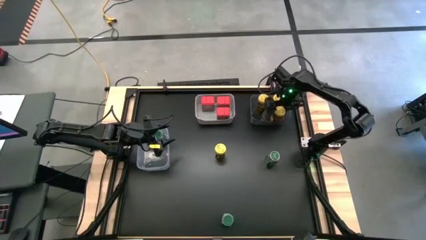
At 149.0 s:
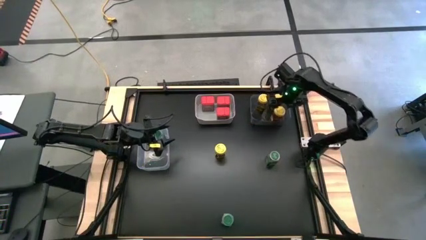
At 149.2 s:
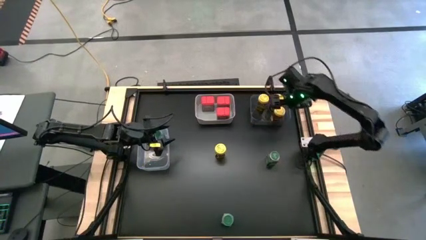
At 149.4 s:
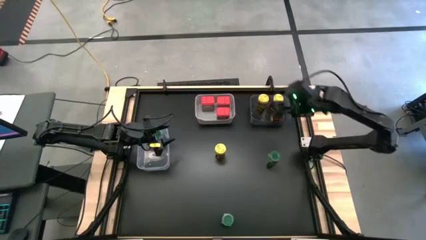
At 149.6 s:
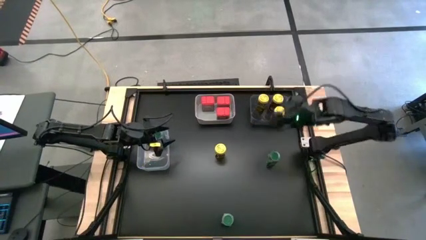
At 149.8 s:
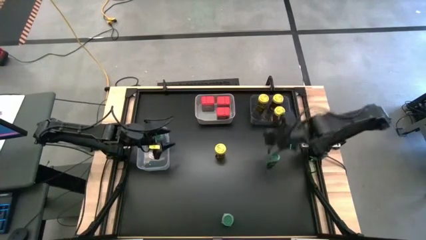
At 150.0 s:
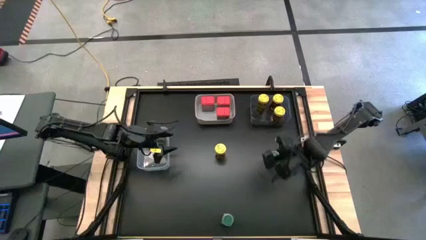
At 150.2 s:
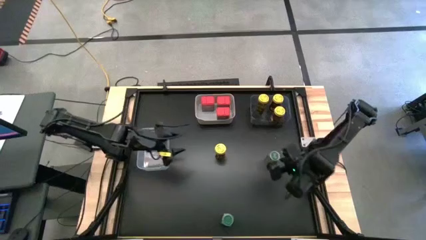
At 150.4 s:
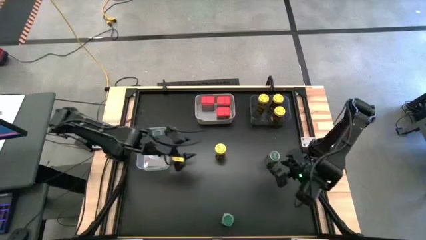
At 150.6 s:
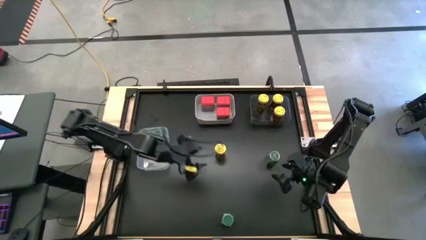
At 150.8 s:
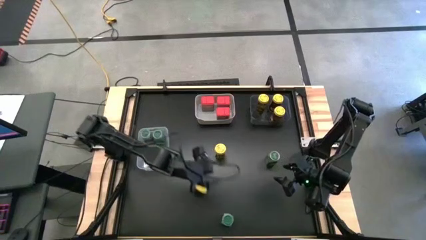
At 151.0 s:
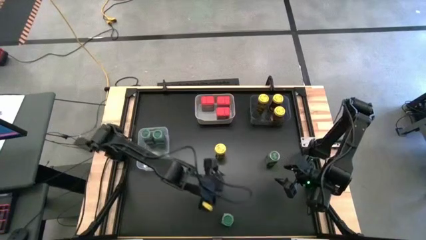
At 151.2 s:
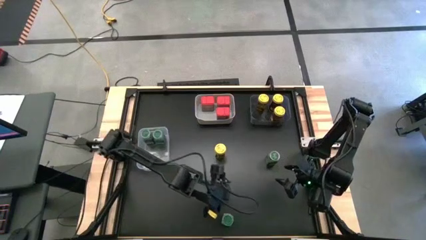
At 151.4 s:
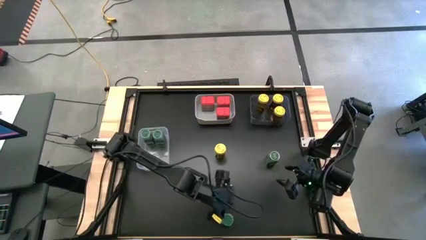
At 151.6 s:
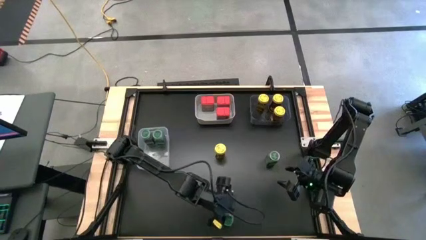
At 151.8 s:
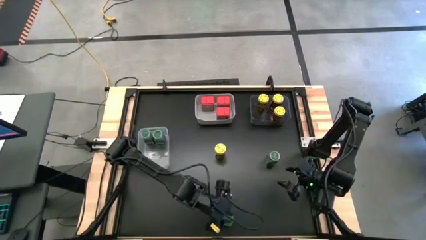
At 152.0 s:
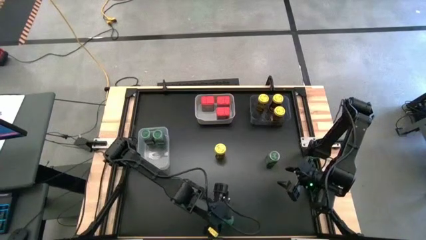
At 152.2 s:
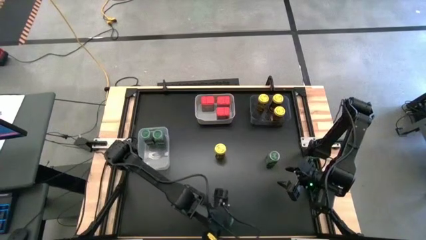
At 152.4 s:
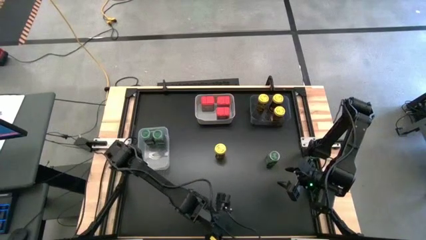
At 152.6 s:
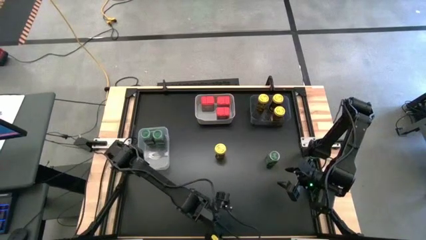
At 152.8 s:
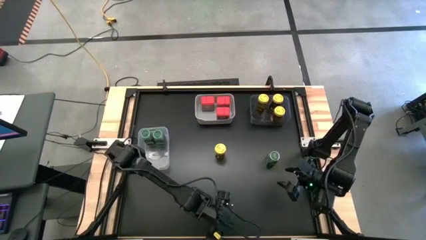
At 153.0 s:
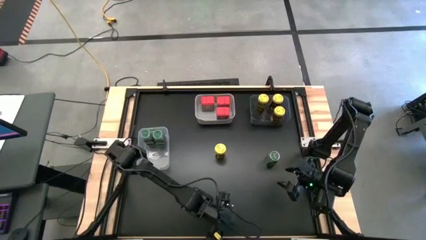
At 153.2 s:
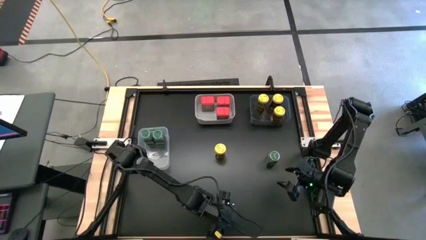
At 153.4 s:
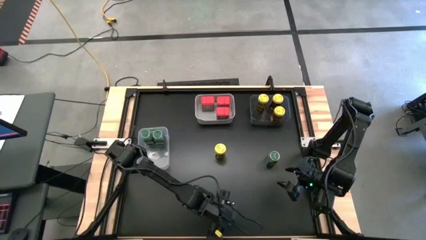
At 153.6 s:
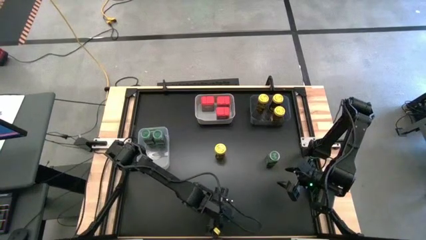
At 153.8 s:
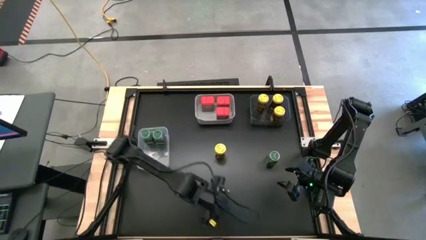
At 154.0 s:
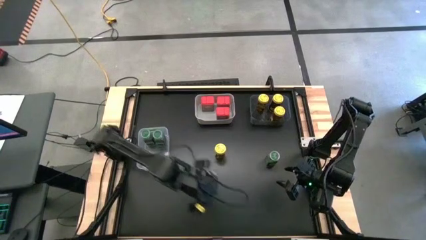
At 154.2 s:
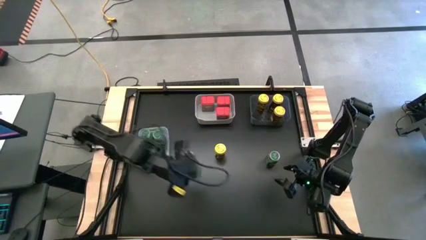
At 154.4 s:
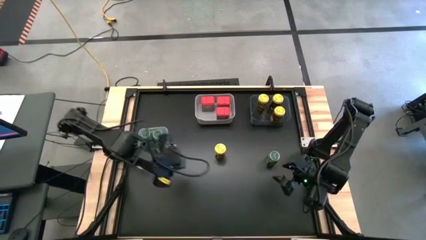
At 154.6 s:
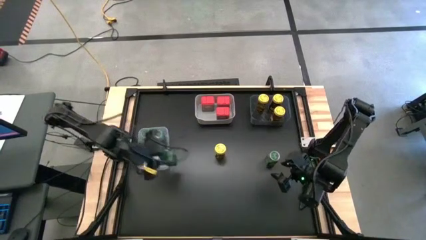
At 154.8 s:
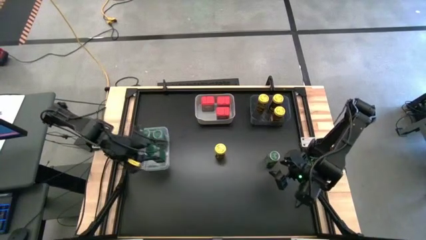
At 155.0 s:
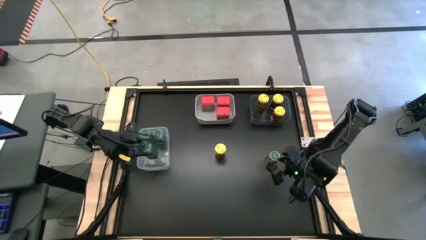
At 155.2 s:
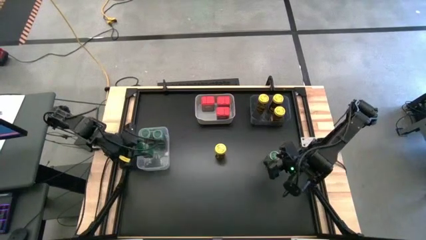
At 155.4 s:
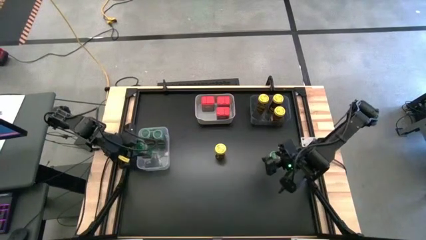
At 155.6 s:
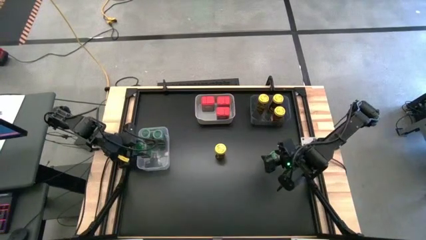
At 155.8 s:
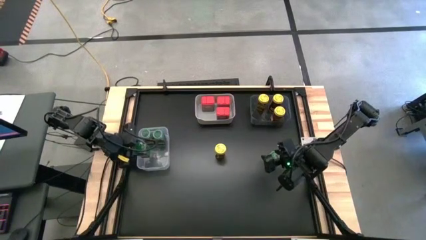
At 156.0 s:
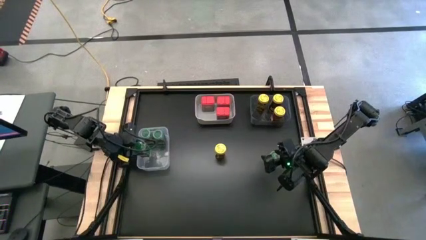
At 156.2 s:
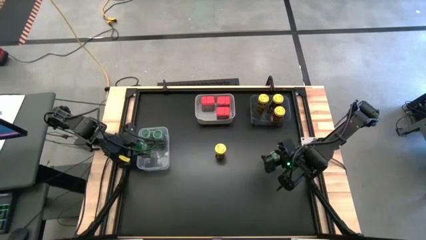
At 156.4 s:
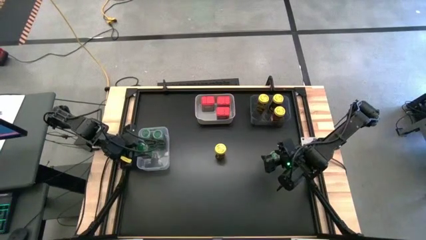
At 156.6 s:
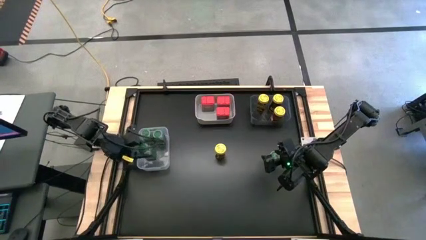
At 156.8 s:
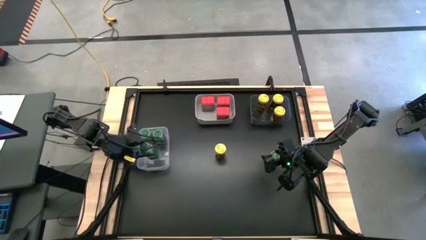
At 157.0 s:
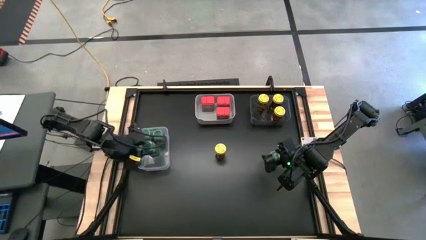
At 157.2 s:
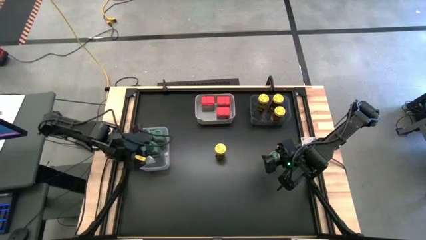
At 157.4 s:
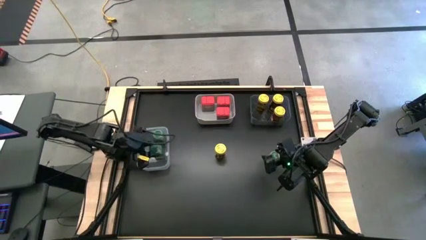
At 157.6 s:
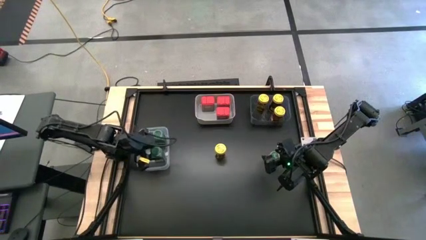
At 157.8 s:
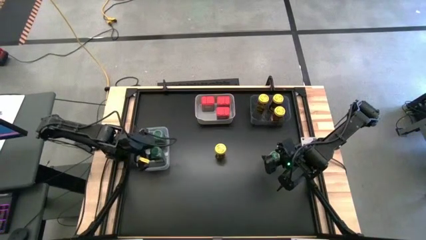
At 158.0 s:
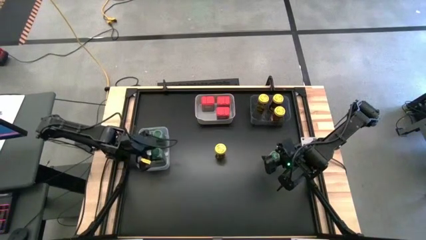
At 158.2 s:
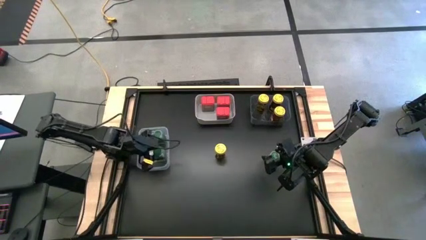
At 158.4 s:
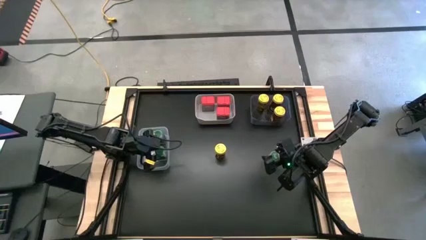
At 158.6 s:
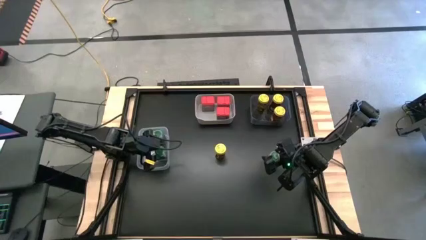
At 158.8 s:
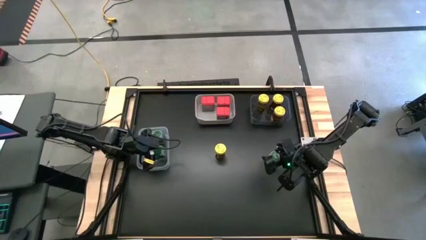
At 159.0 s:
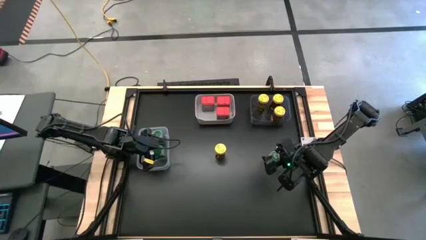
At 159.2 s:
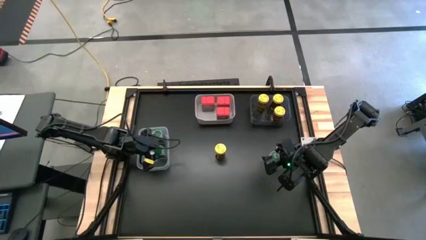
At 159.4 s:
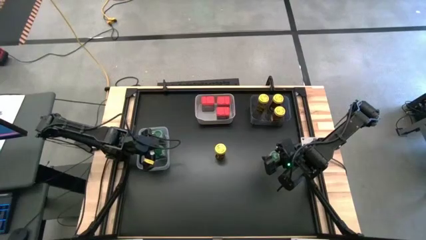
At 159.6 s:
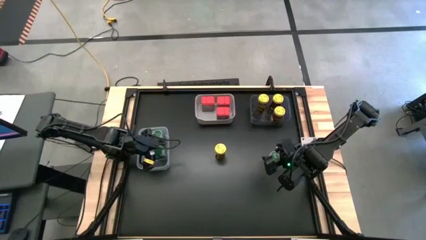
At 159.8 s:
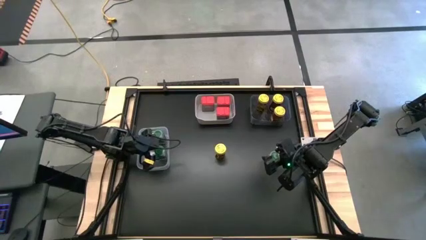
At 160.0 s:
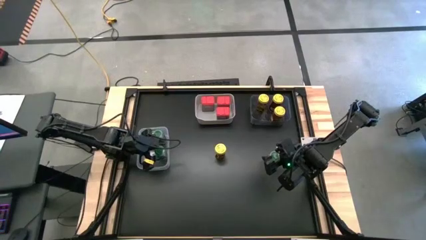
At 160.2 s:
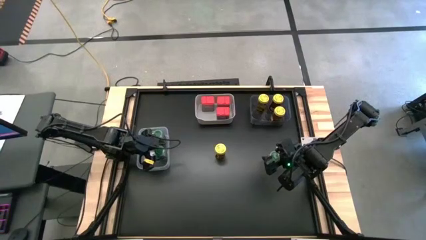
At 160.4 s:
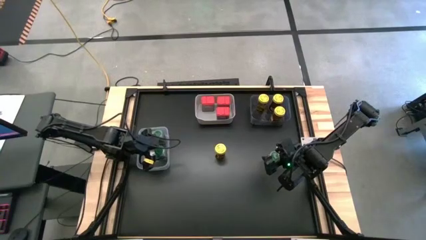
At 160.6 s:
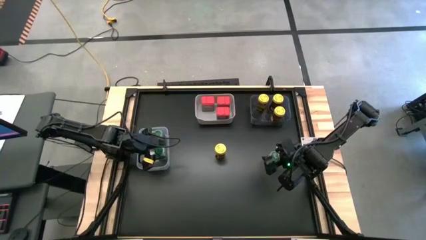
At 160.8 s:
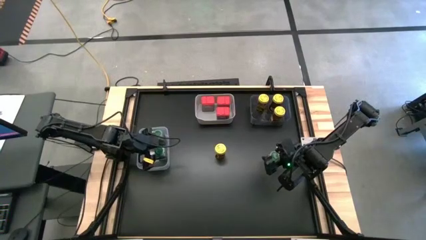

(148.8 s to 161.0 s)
Task: Sort spices by type
Put the left green seasoning bottle into the transparent bin

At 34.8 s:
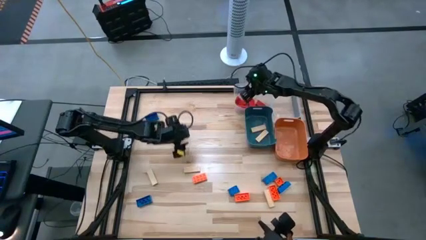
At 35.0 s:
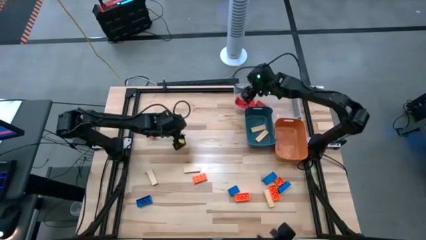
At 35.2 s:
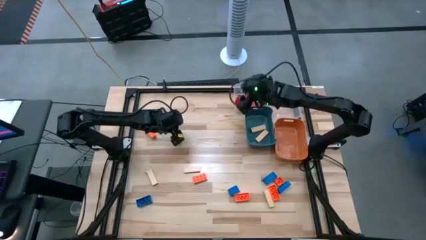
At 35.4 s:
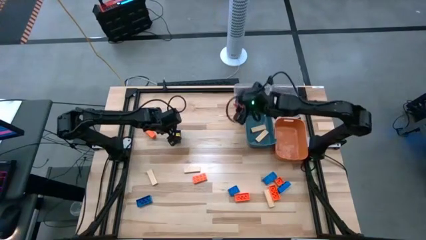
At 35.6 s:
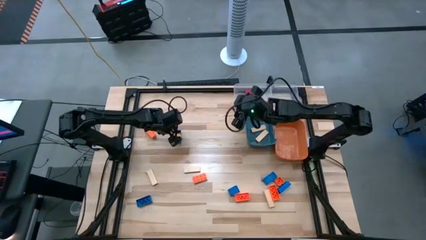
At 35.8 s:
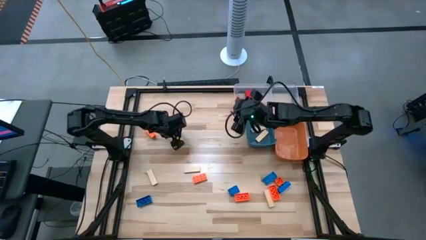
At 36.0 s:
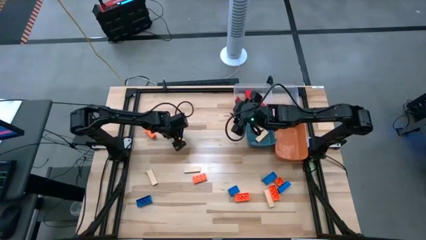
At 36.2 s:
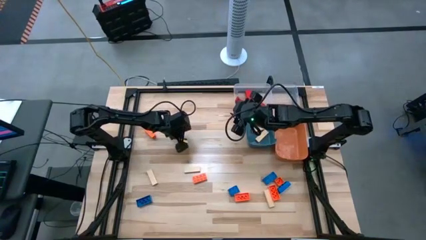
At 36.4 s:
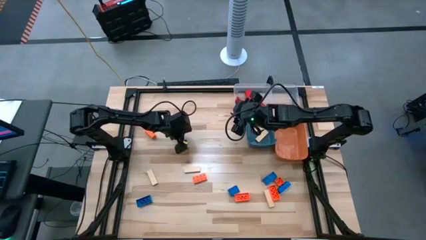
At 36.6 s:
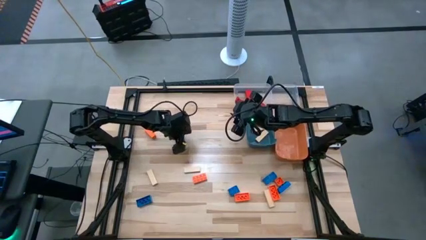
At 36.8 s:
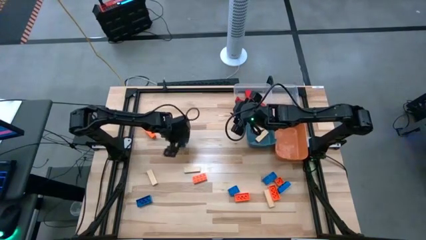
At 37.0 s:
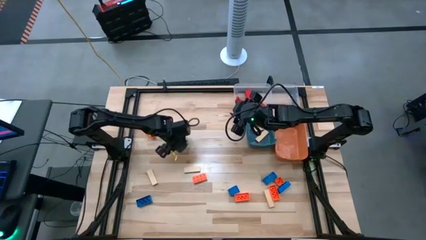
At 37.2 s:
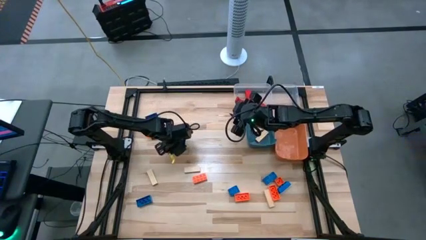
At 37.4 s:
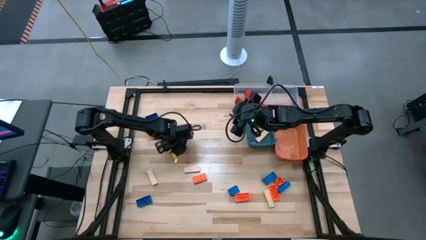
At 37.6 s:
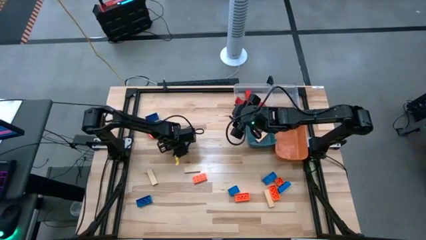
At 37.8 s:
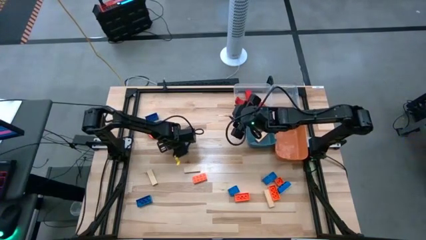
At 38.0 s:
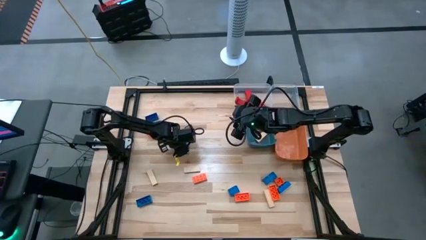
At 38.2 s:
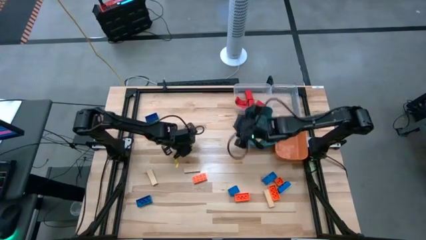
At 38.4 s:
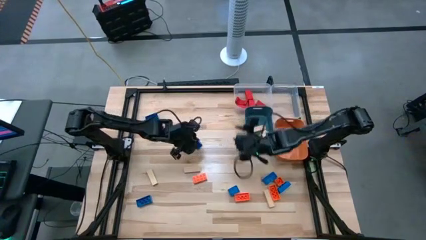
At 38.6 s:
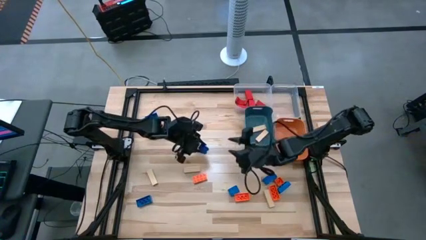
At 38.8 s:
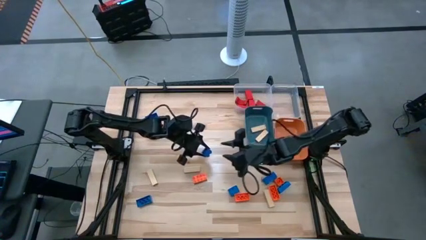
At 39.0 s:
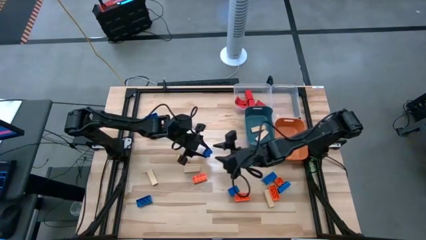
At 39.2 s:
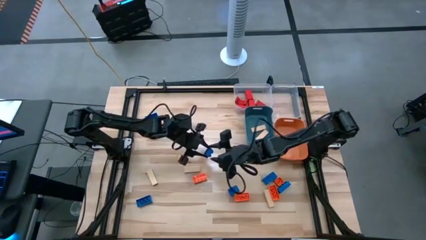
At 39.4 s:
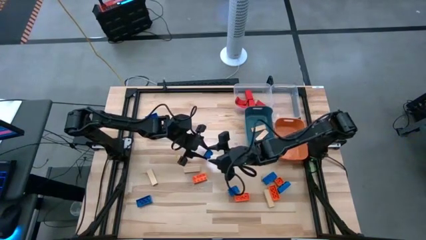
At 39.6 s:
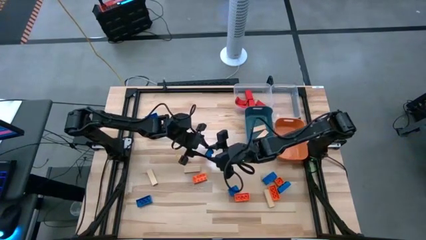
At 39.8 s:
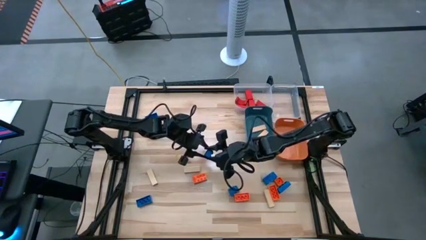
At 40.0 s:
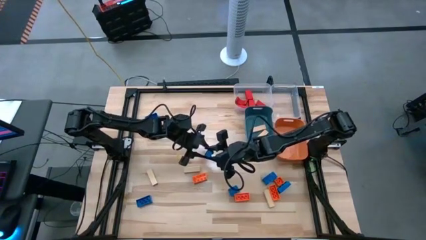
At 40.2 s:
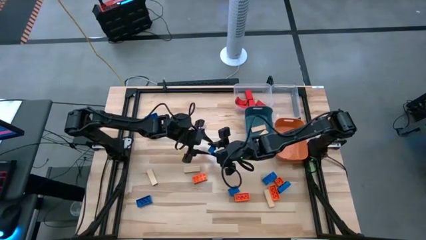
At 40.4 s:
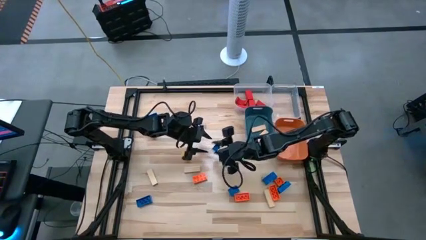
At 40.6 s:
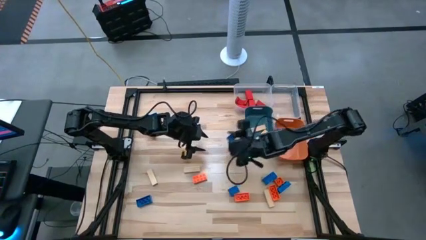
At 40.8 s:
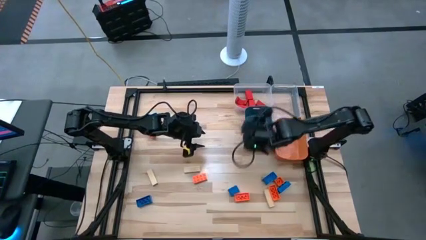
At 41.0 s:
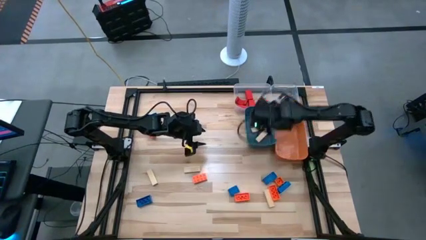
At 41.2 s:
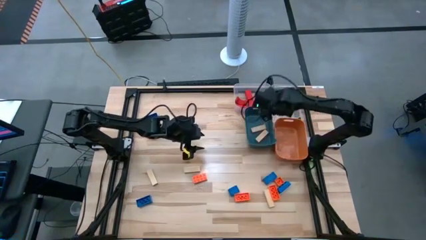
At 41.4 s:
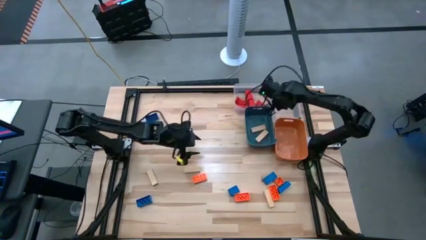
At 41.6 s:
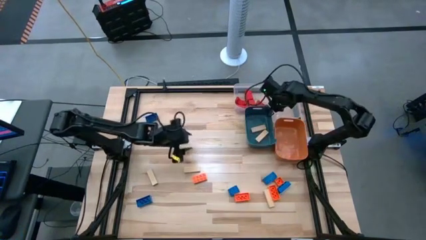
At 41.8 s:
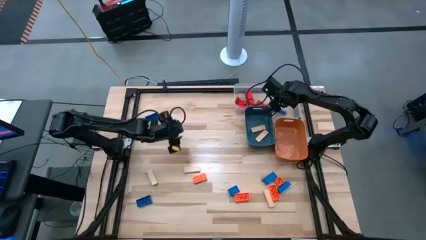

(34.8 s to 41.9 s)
Task: Sort blocks
Put the 8 stud blue game piece into the right transparent bin
